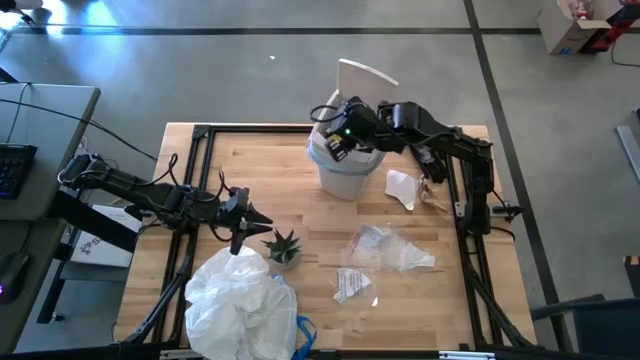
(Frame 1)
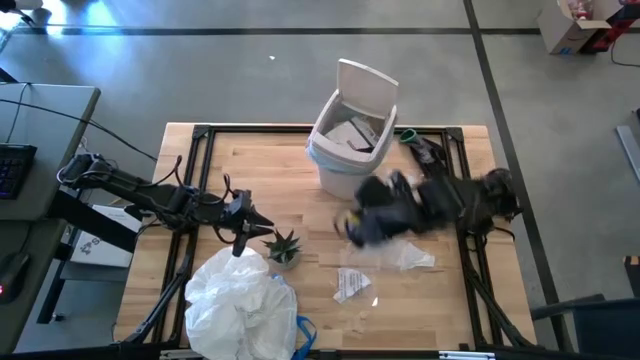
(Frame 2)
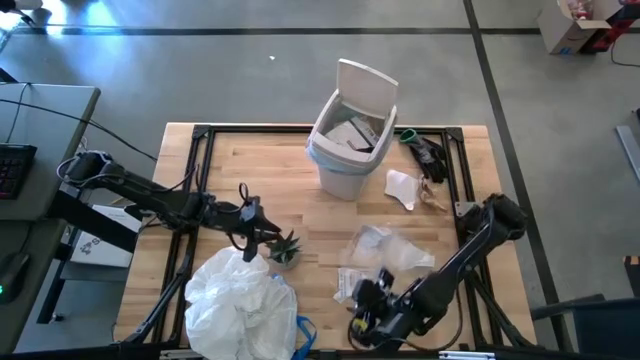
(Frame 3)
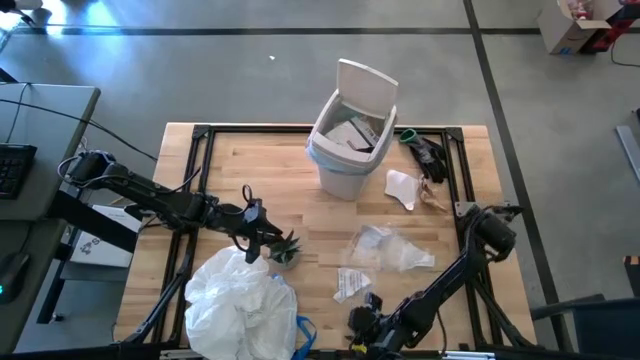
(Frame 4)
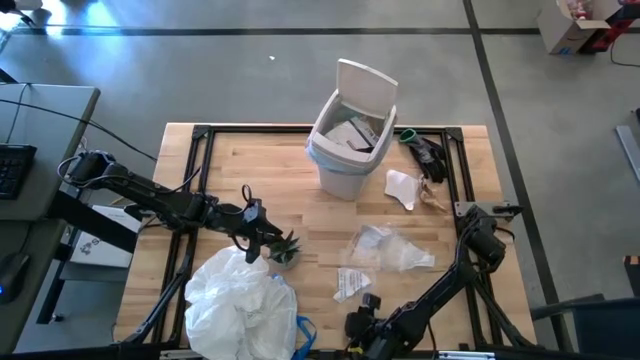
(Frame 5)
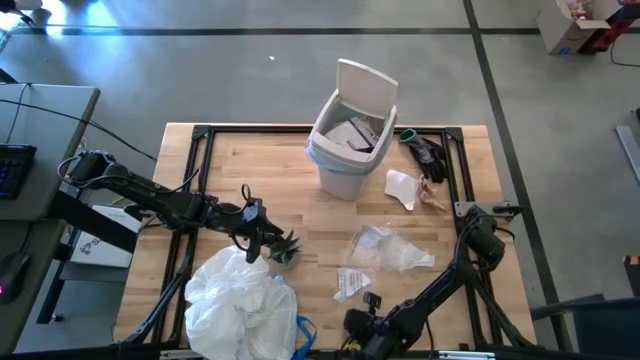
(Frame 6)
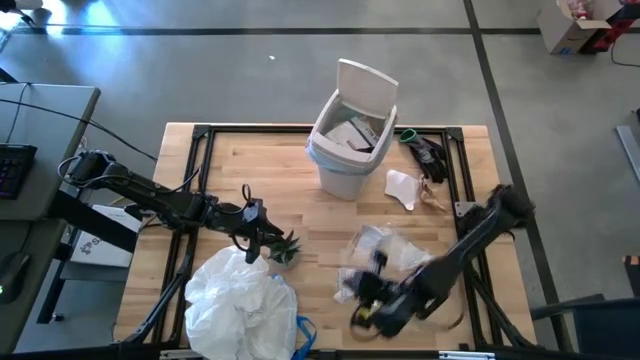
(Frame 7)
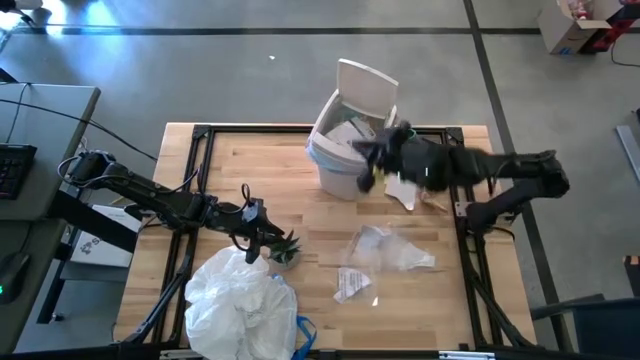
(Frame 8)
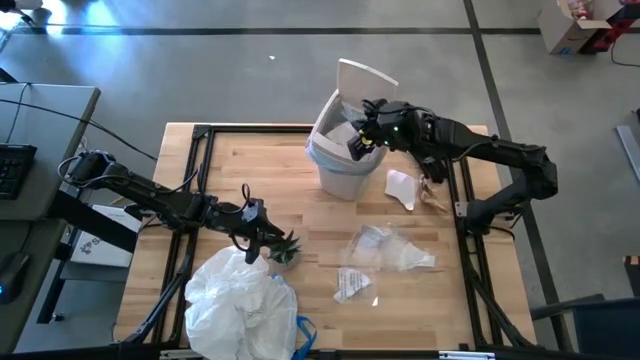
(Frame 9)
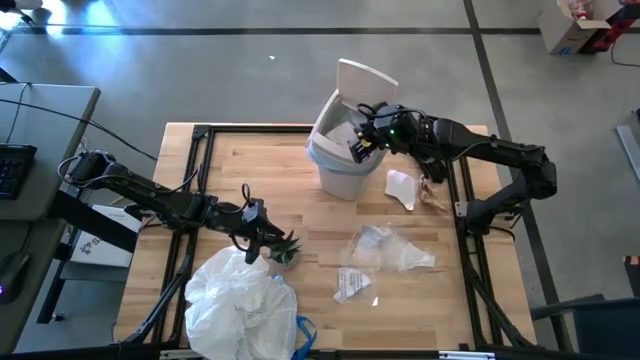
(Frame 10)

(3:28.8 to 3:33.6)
Task: place trash/remove bag and relplace
Put the transparent plastic into the trash bin

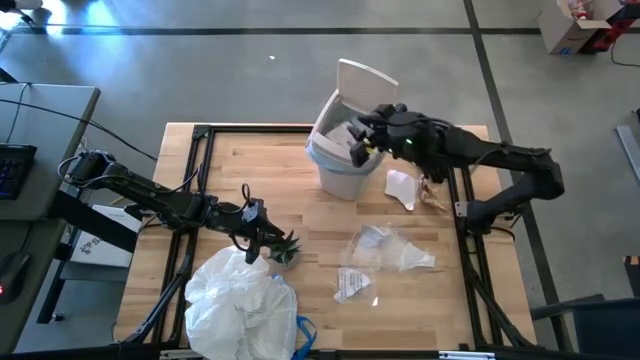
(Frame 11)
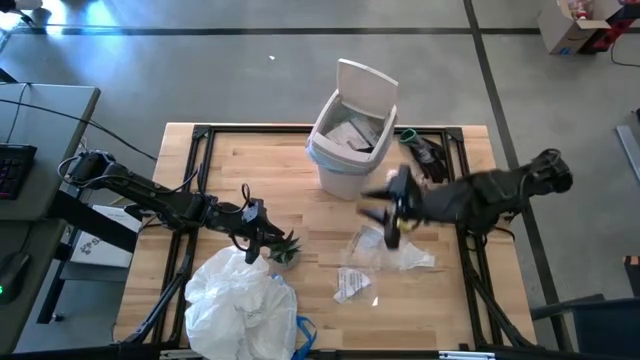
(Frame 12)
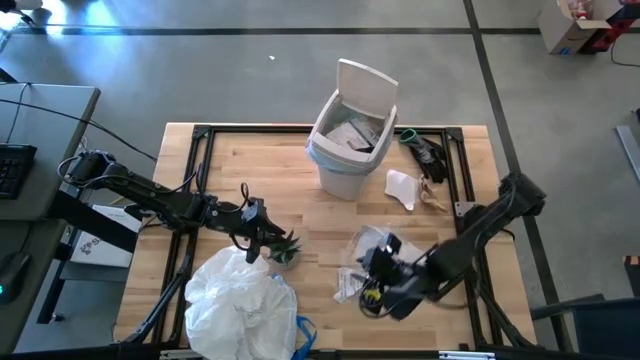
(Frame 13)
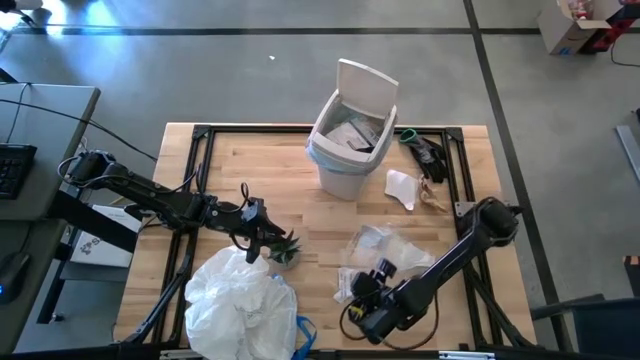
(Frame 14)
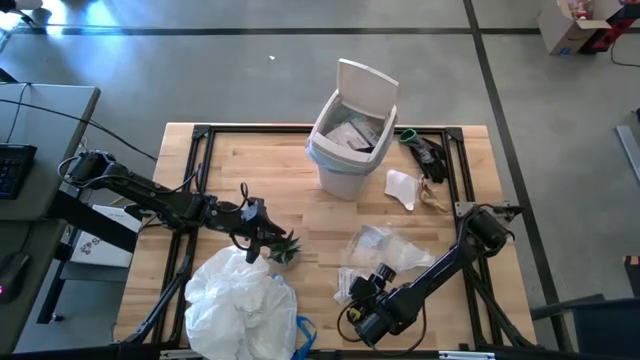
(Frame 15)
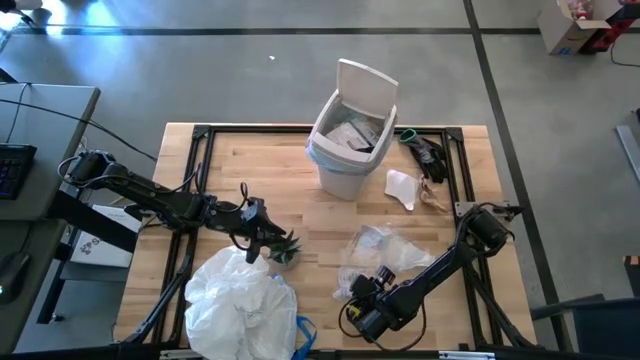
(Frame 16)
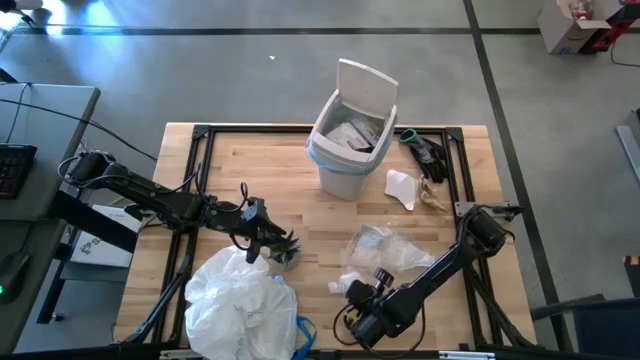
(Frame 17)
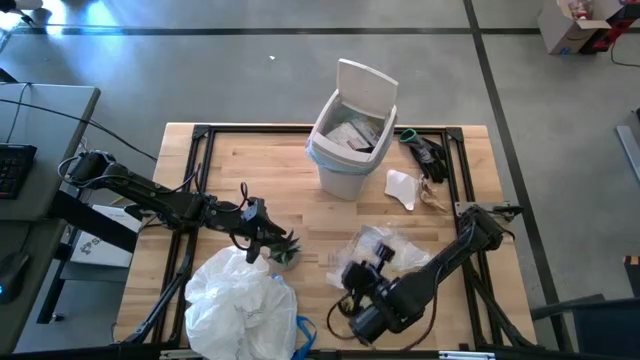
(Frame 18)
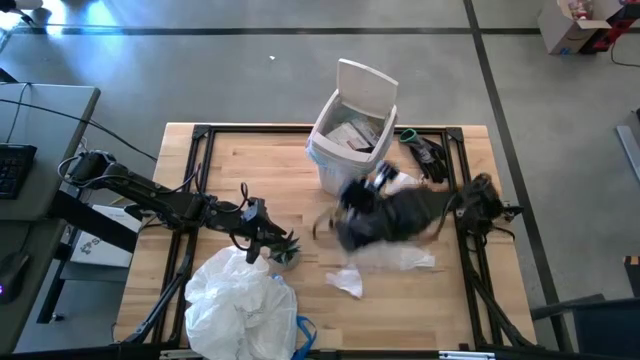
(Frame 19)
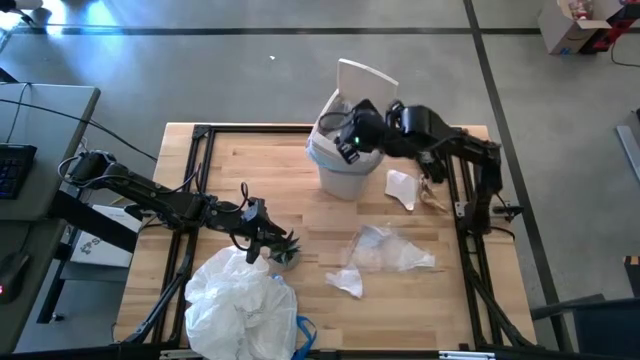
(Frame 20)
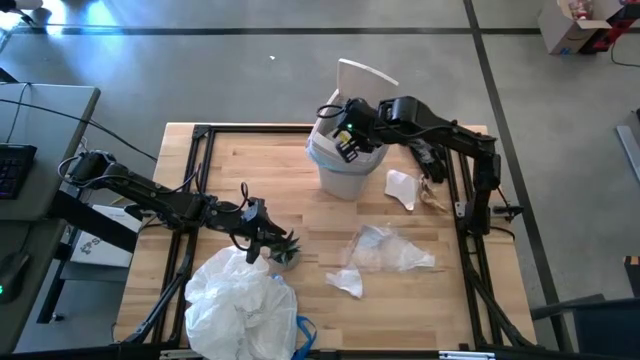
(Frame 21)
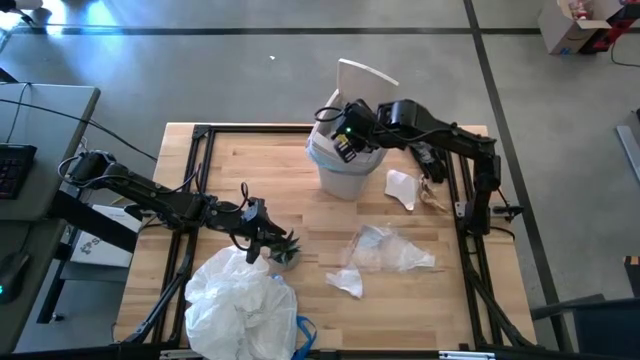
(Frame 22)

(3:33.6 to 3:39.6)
Put the transparent plastic into the trash bin

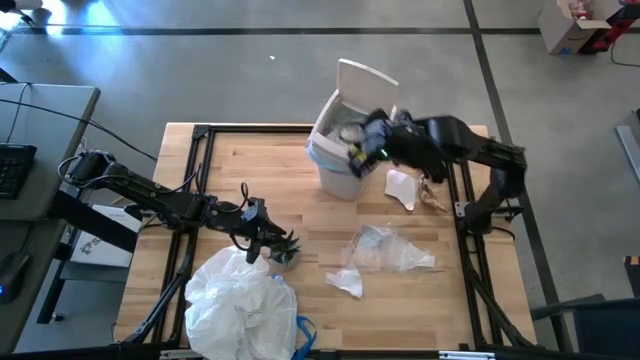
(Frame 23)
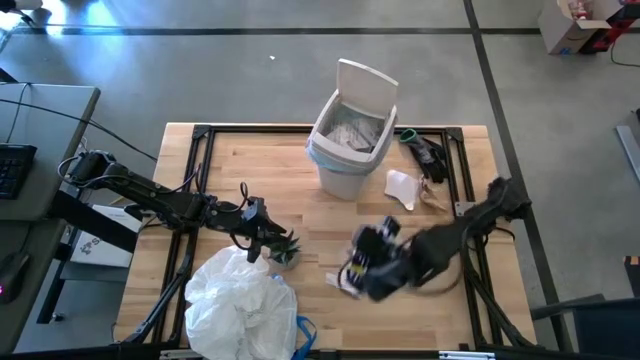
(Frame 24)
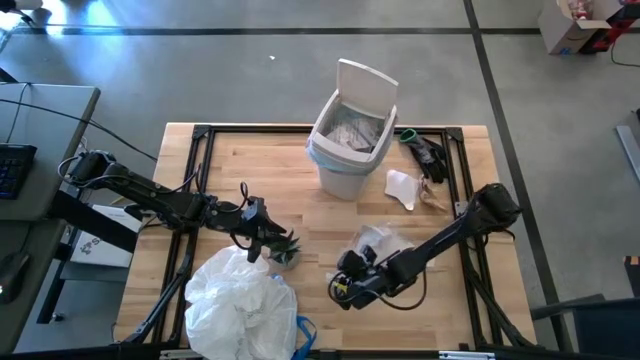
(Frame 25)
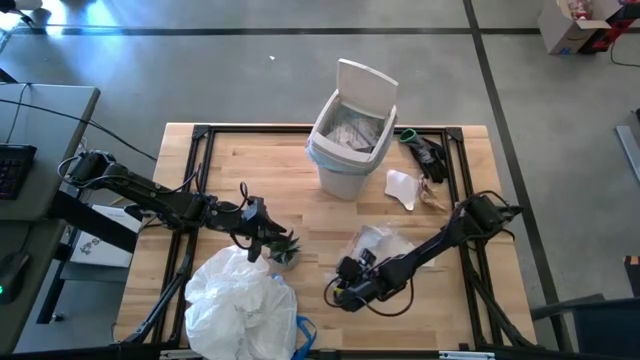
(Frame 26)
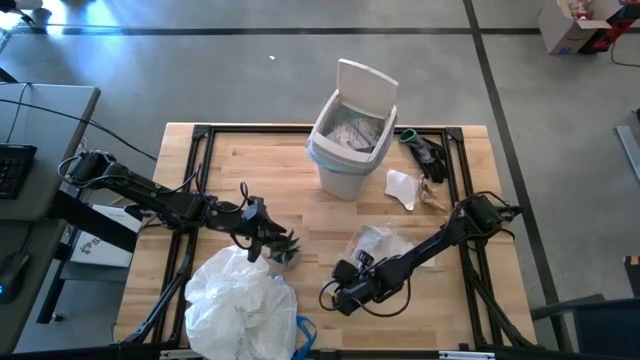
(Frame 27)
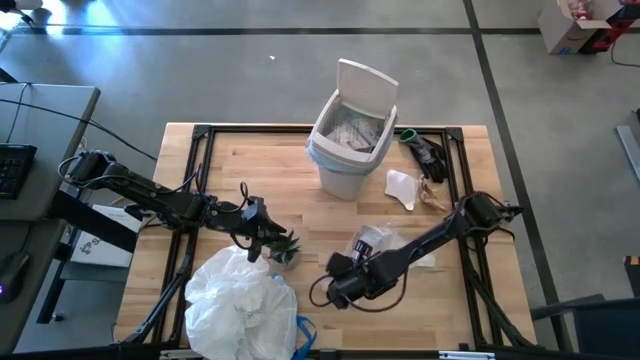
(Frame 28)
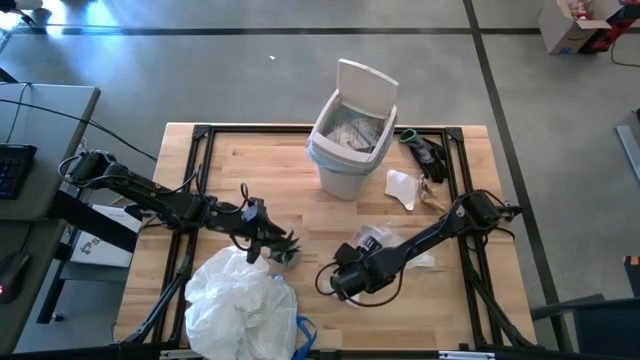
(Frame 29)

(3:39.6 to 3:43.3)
Put the transparent plastic into the trash bin

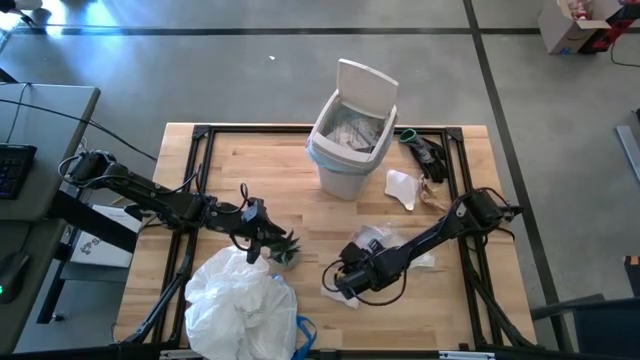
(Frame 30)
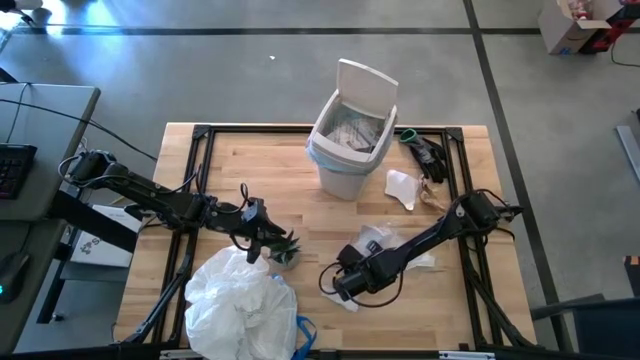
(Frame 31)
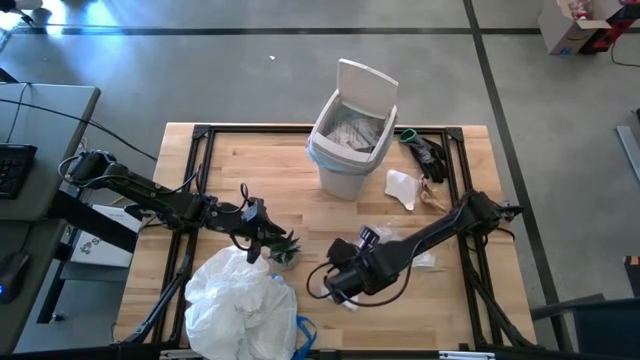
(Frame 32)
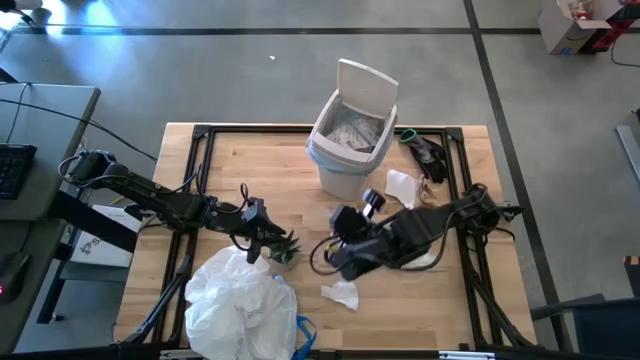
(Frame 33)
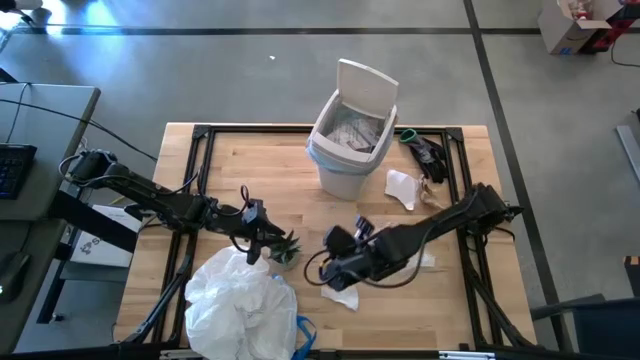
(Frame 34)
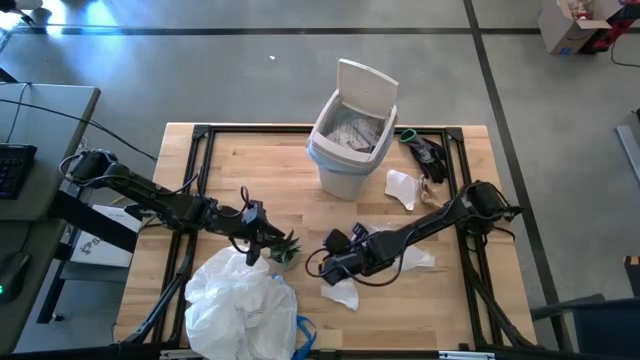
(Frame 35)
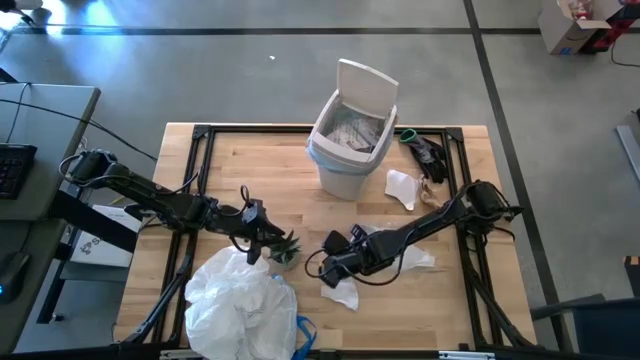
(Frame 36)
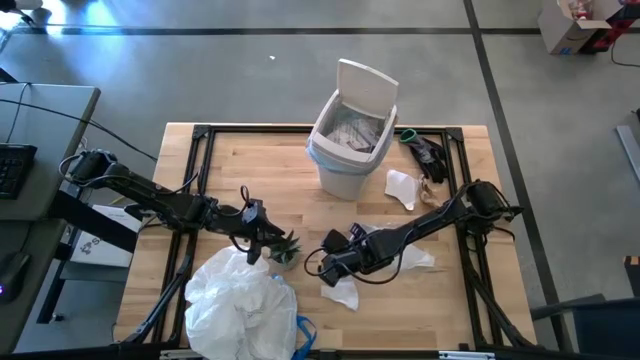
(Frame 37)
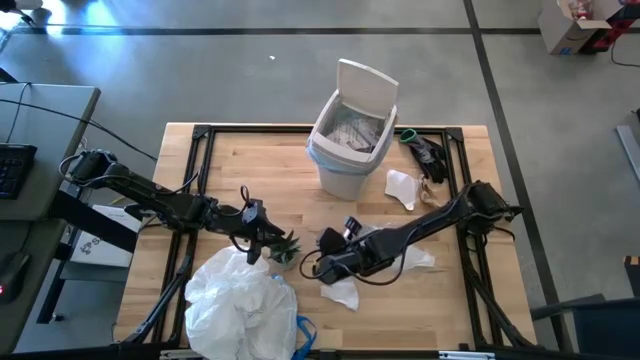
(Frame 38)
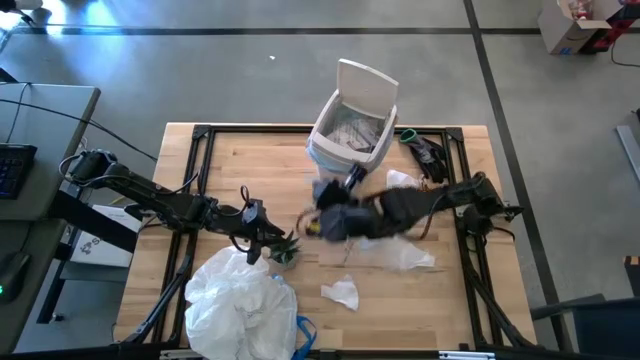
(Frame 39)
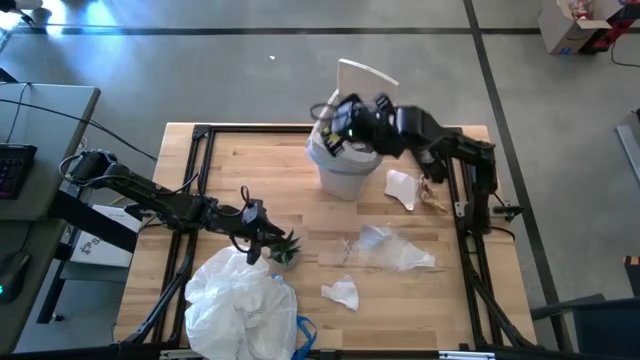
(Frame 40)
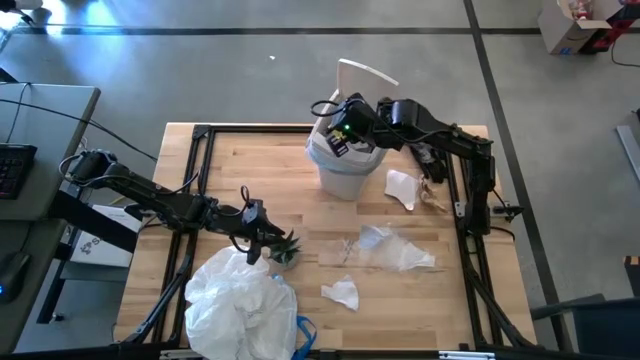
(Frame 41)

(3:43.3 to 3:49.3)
Put the transparent plastic into the trash bin

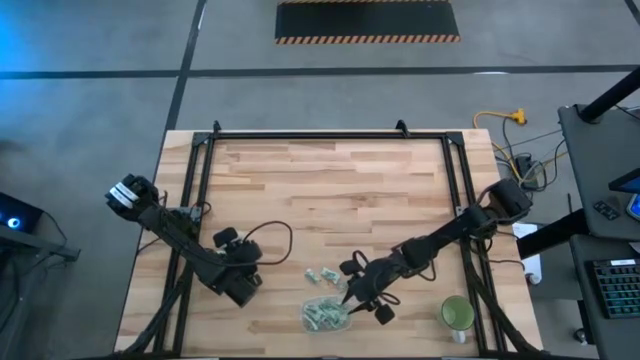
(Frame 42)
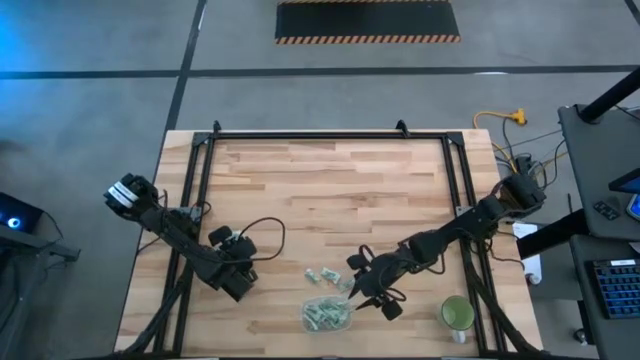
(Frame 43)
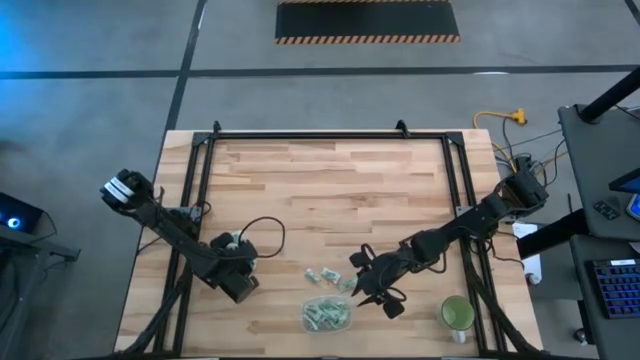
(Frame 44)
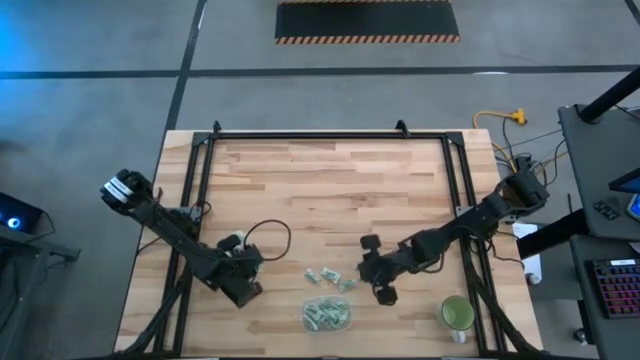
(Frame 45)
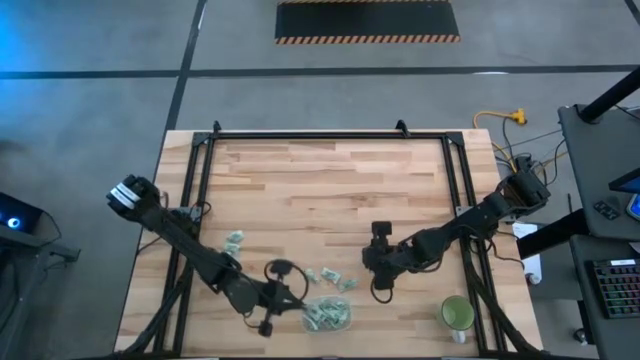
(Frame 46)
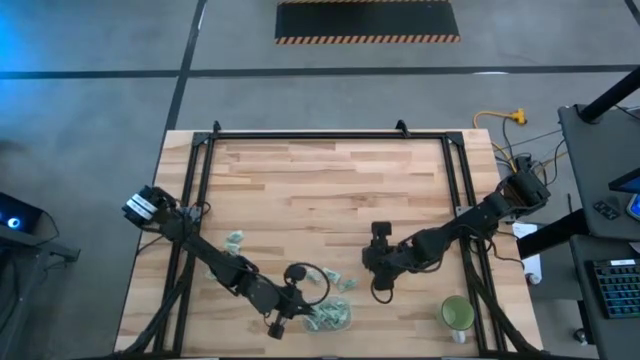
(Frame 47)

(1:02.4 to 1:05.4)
Task: Pick and place Stevia / Truvia into bins
Put the stevia packet into the transparent container
